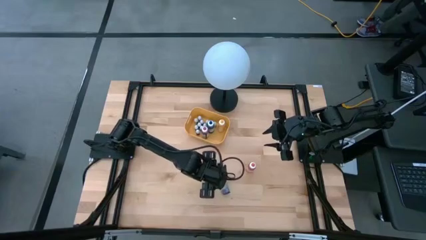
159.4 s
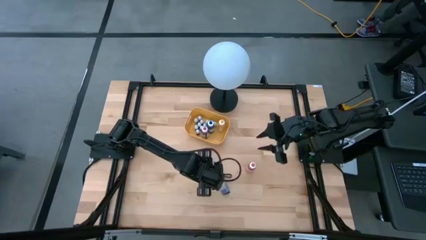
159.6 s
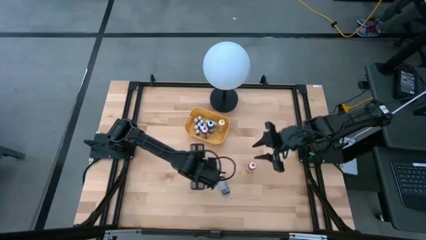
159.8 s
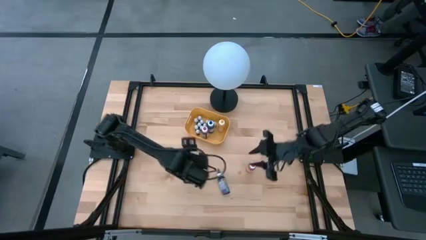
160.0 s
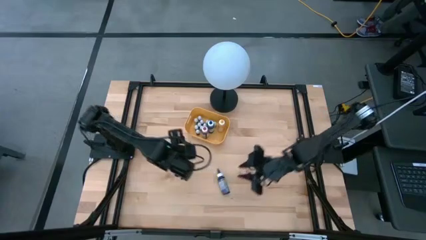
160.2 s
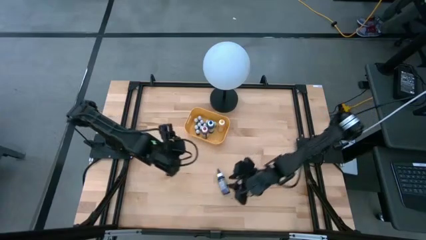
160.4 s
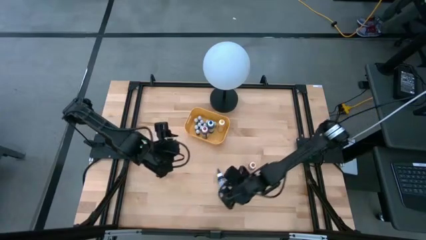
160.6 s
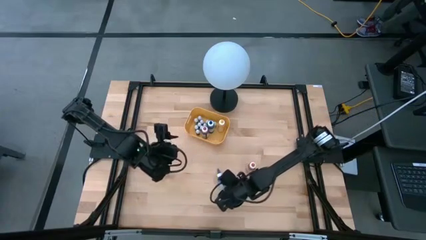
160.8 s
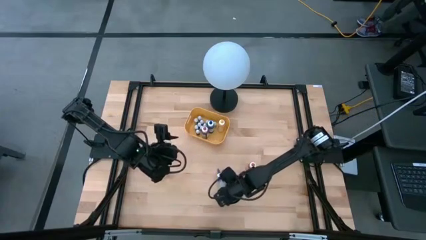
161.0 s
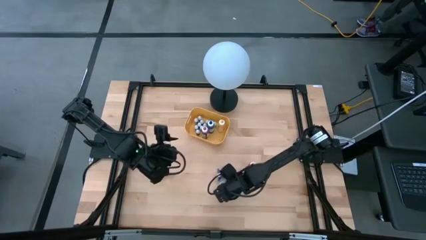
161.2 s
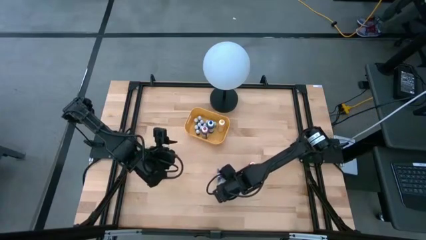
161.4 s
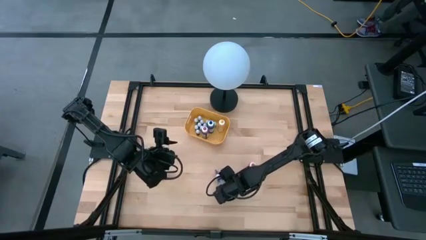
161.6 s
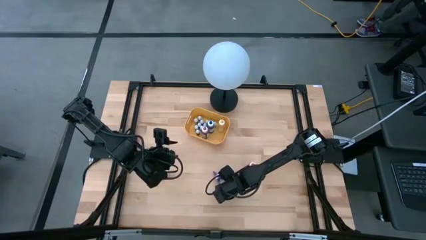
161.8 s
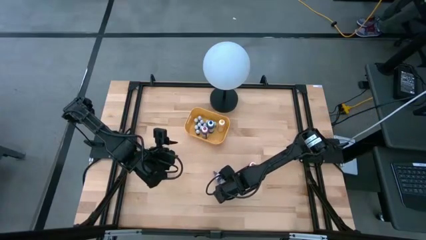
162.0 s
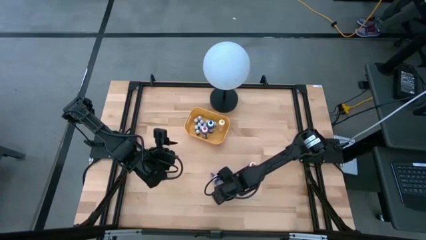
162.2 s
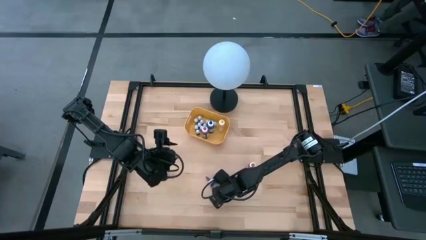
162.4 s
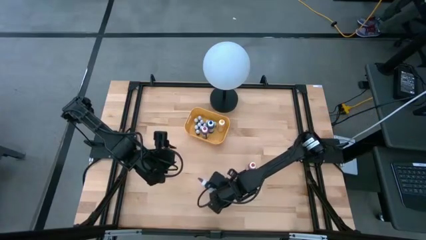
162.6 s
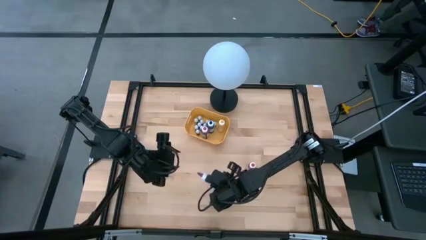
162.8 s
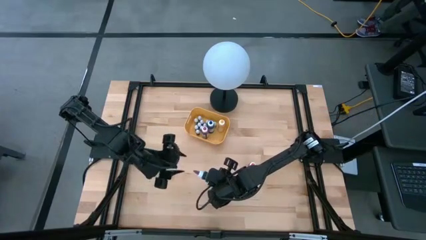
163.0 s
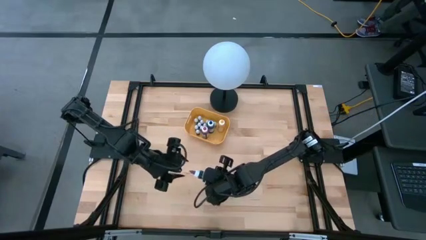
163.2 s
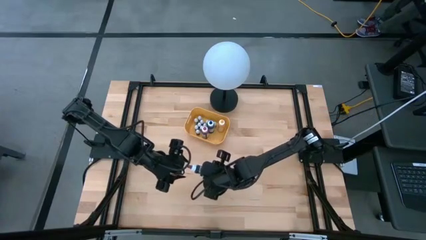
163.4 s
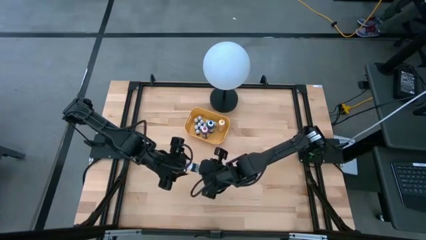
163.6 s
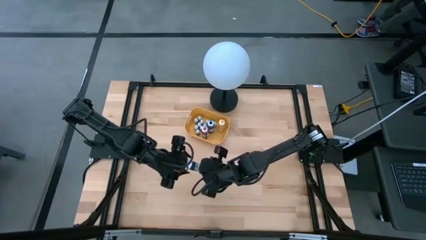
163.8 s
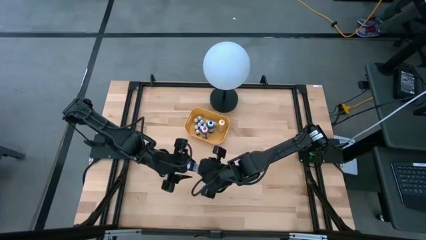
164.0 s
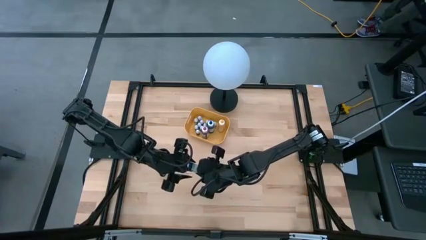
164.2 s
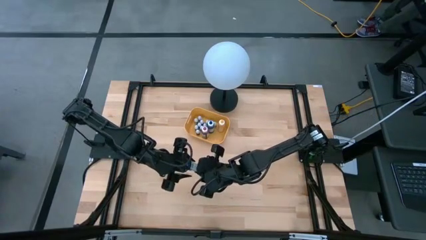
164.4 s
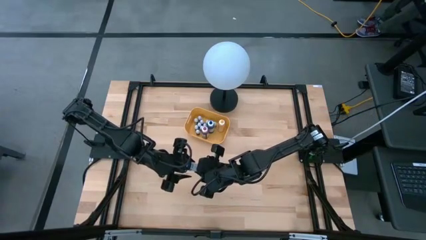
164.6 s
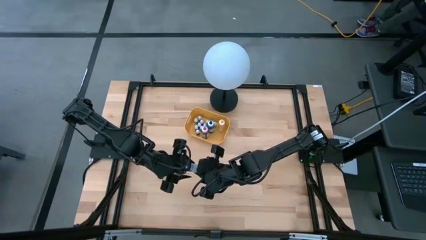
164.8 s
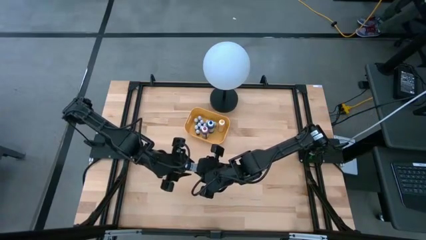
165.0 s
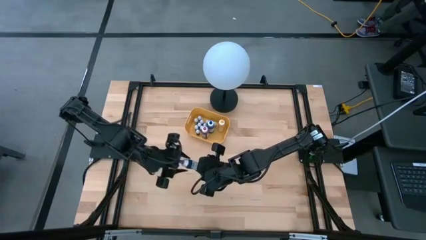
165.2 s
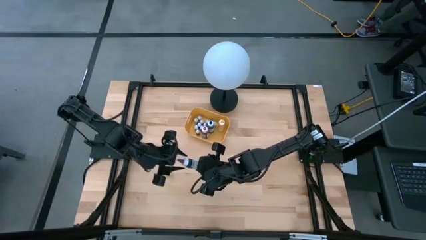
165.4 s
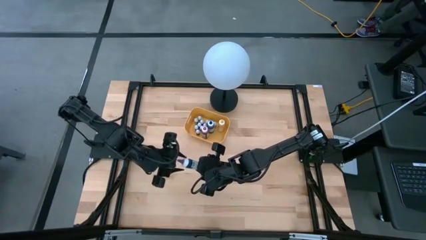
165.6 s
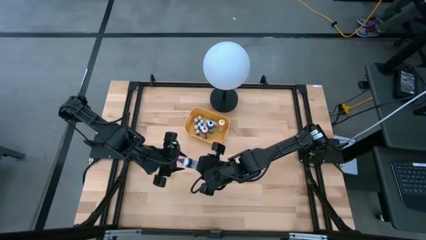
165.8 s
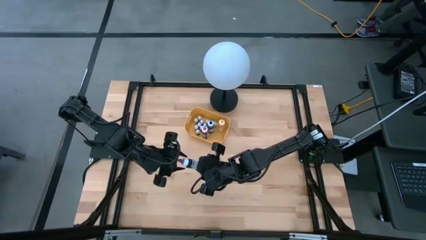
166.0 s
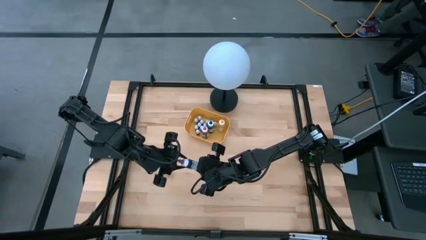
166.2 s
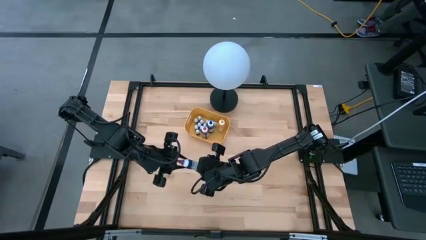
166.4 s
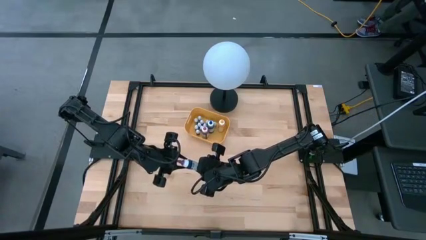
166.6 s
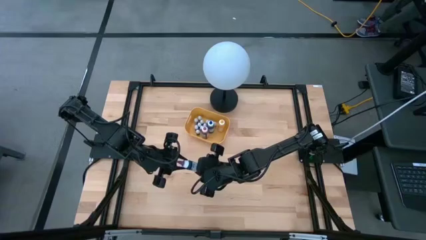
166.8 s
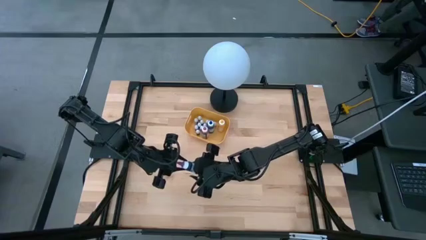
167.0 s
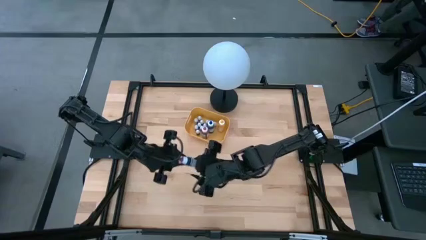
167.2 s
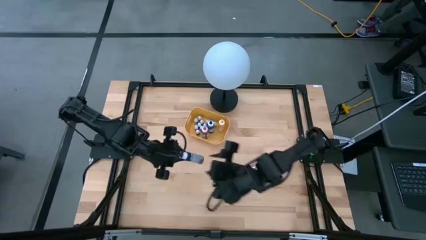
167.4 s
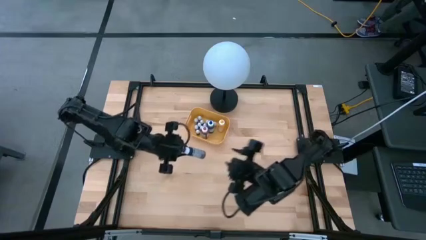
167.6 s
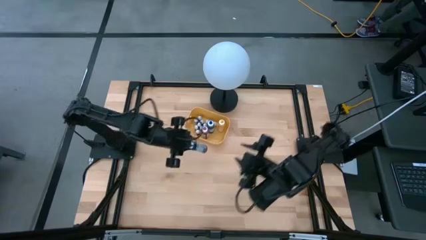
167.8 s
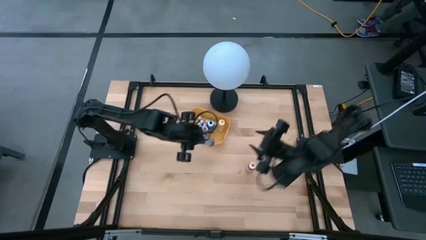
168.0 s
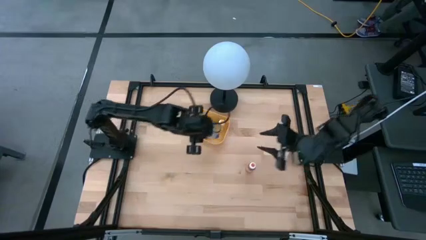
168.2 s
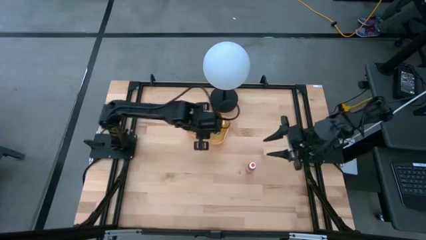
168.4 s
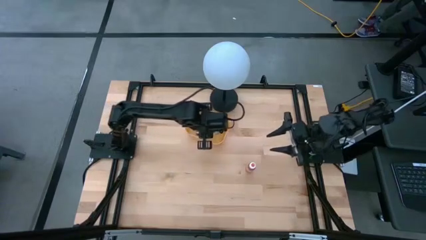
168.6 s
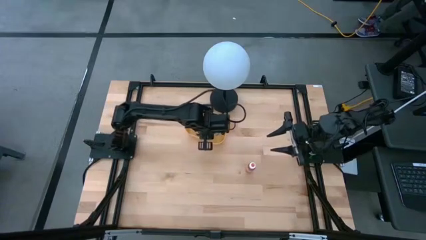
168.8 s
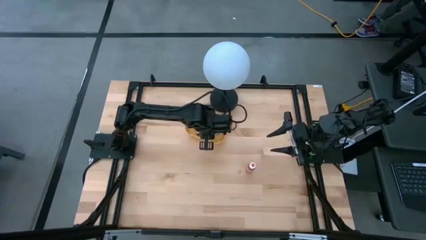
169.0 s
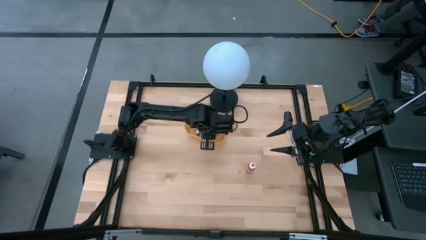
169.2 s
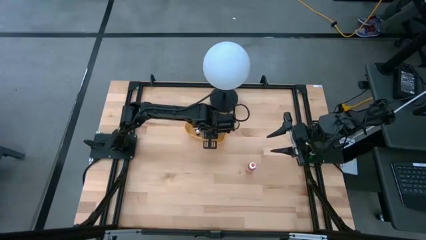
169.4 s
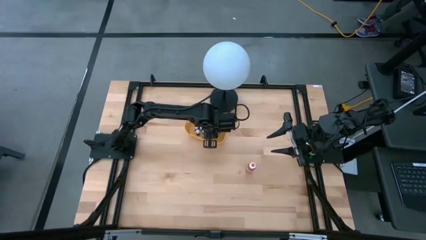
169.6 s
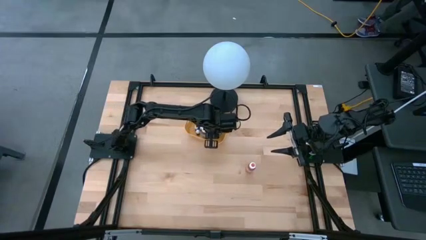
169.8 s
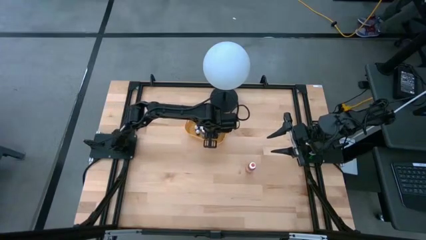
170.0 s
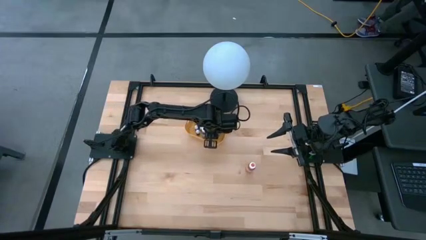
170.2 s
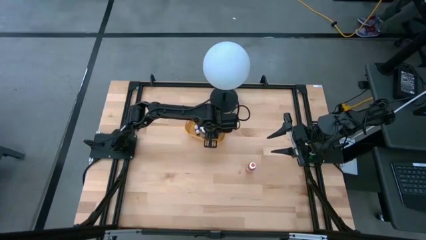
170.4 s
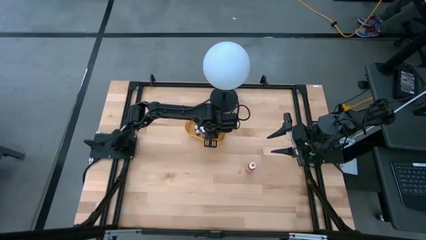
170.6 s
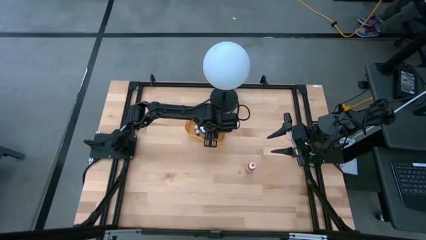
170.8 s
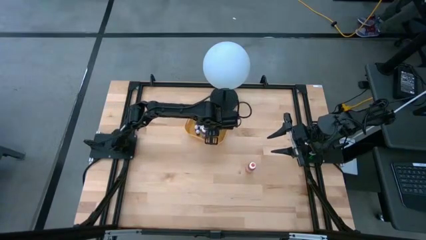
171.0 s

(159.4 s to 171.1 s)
Task: Pick & Place food coloring
Put the large purple food coloring bottle into the yellow bin

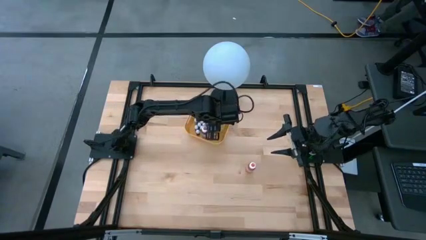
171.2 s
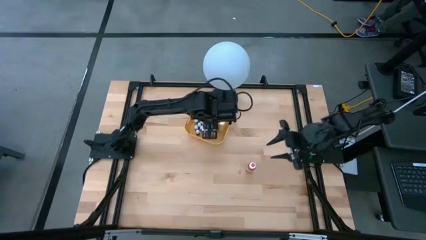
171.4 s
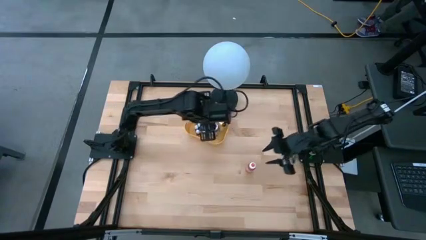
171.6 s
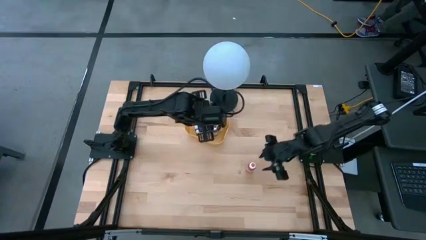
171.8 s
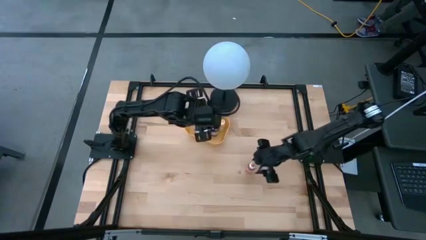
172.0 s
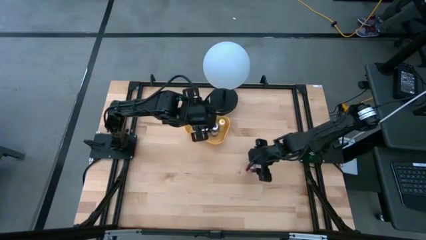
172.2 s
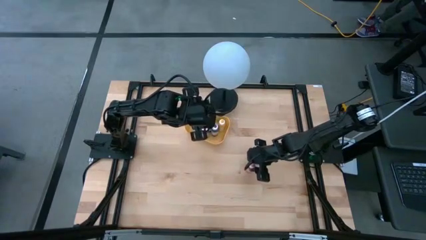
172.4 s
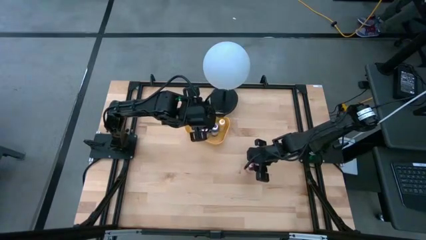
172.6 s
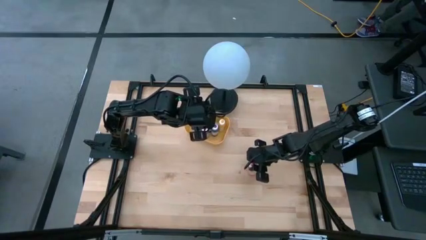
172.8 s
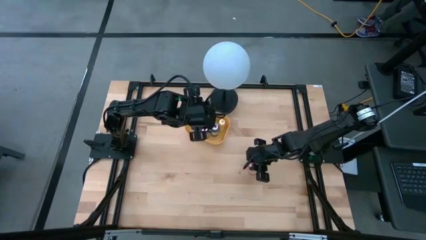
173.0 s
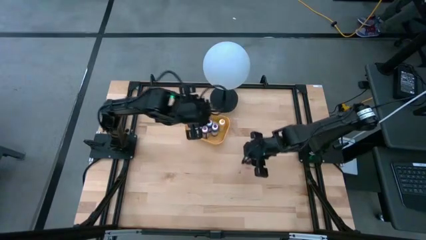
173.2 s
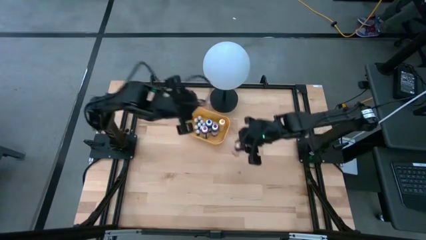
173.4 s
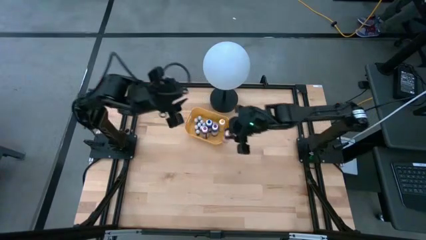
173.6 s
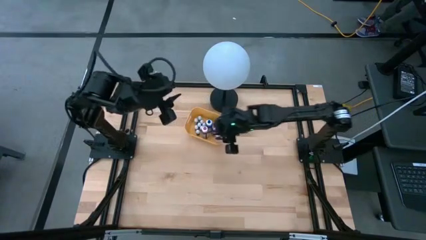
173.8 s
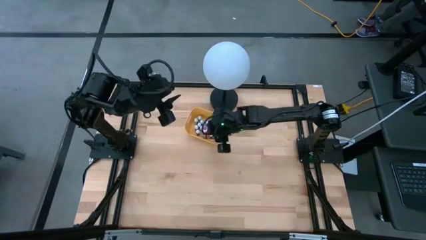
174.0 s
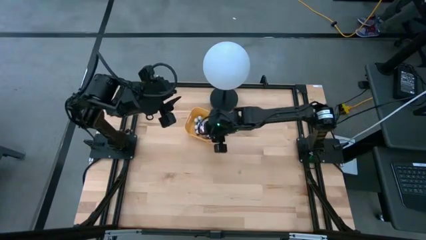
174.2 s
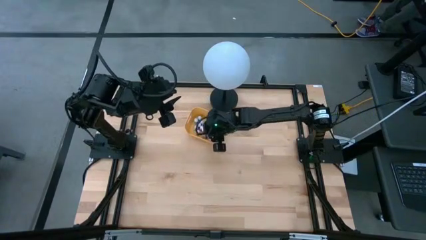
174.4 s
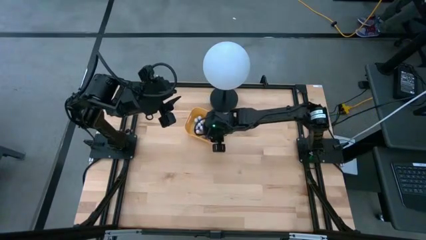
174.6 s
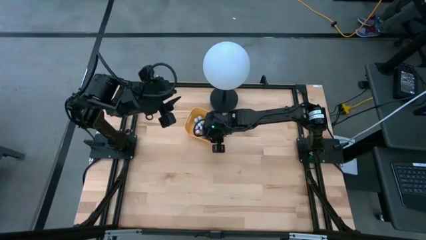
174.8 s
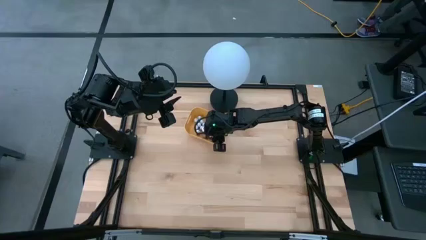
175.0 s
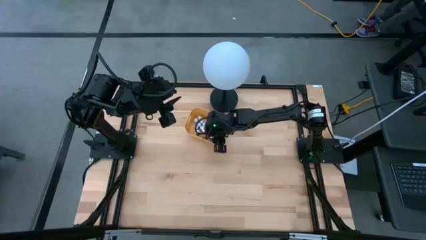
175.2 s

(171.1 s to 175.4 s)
Put the large orange food coloring bottle into the yellow bin
